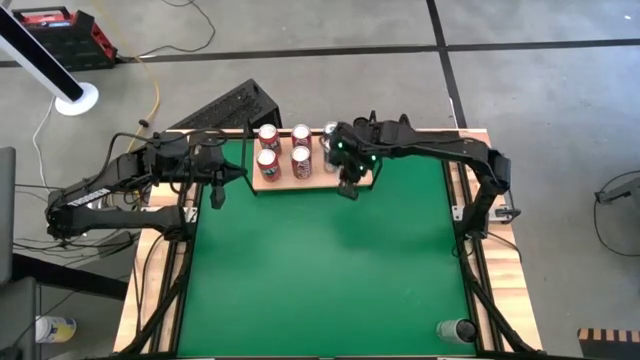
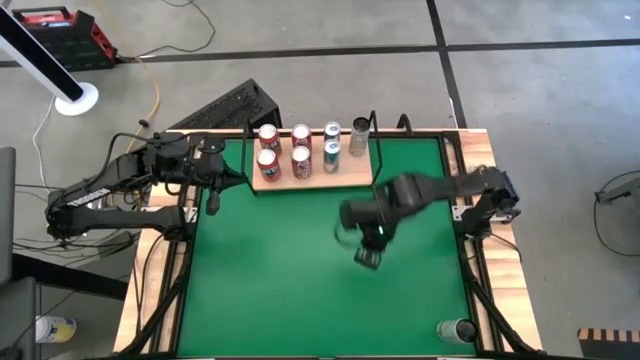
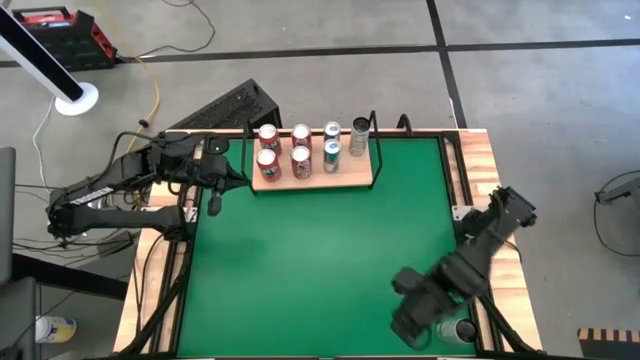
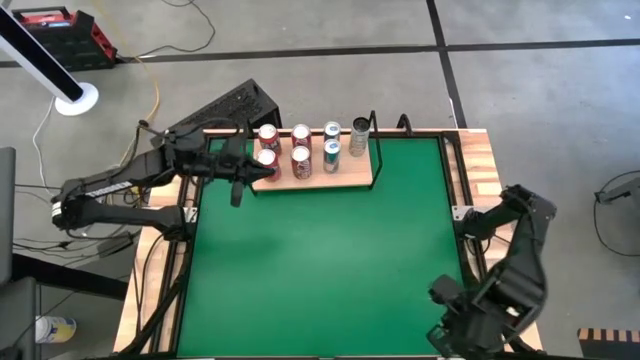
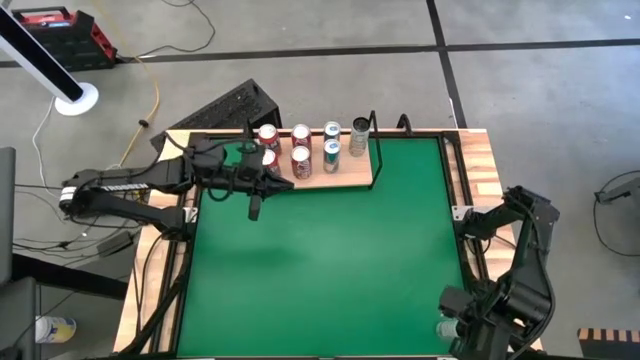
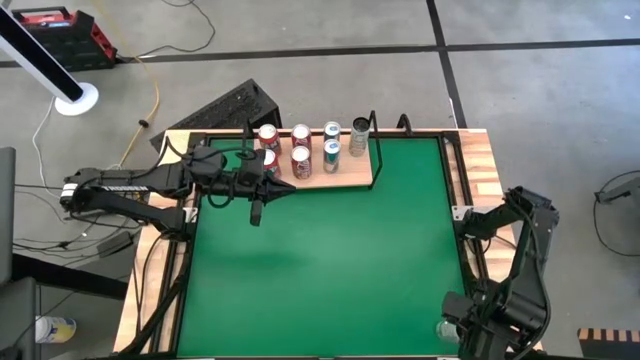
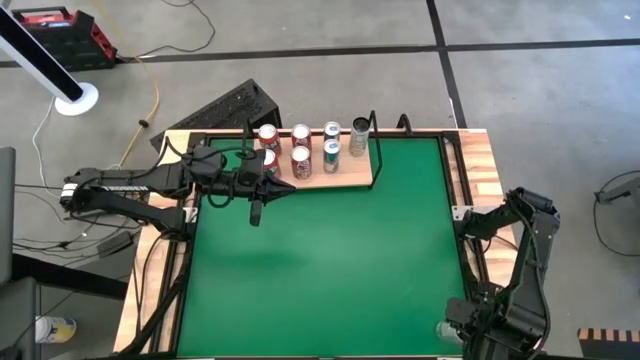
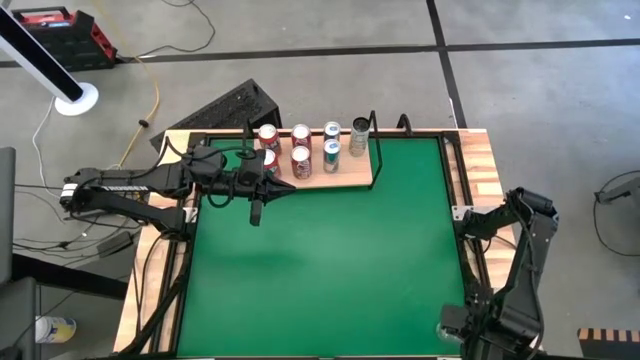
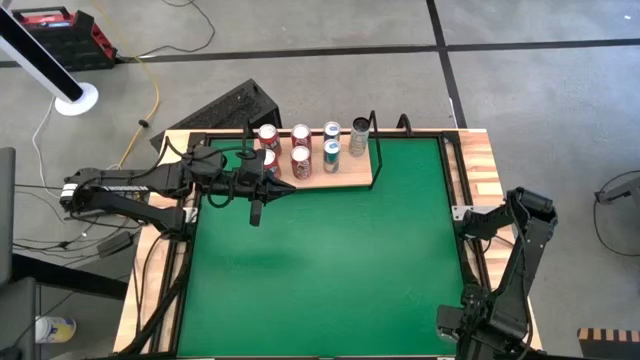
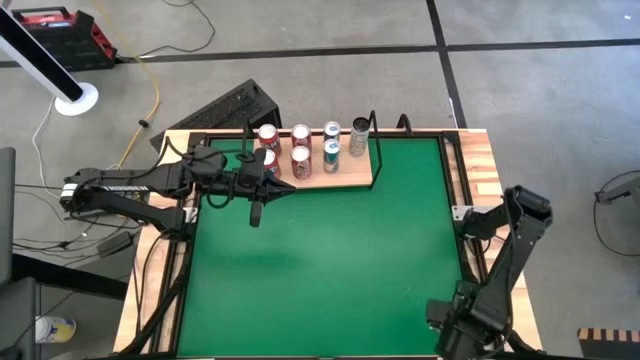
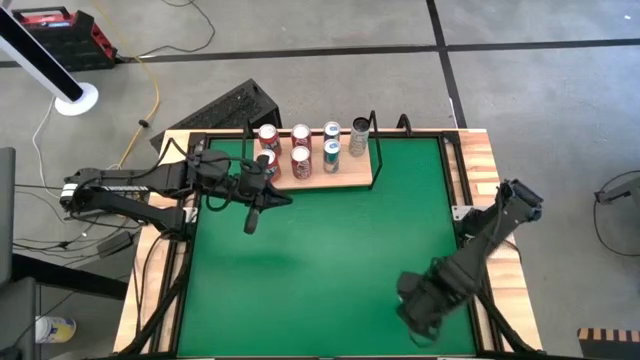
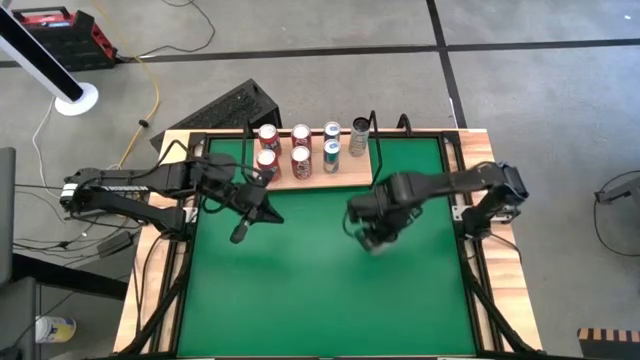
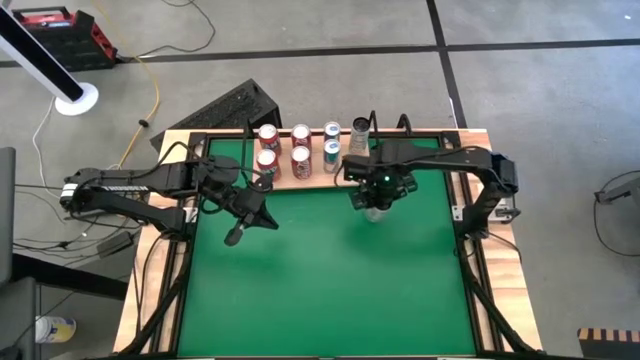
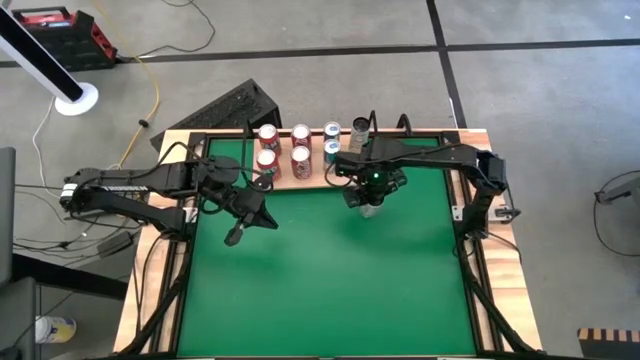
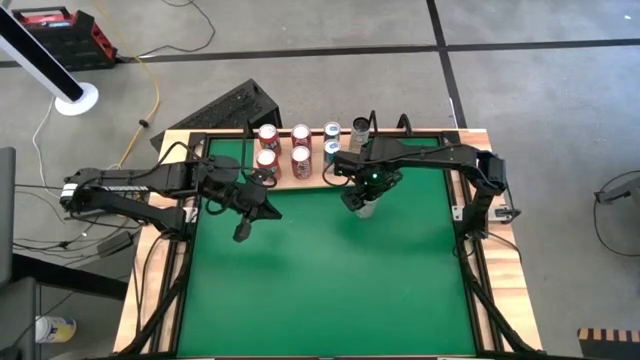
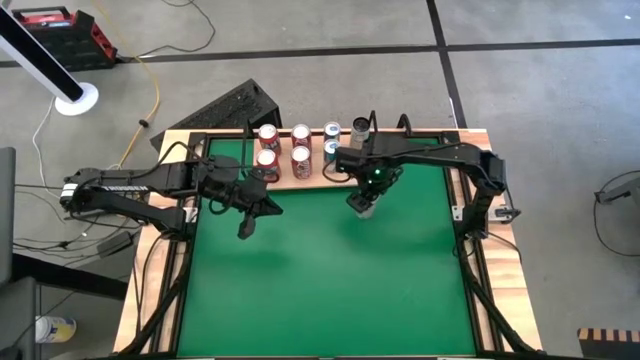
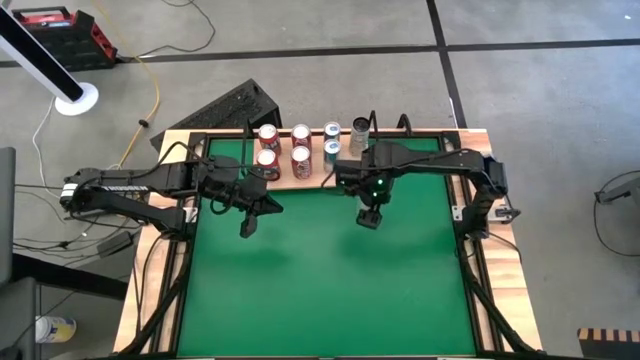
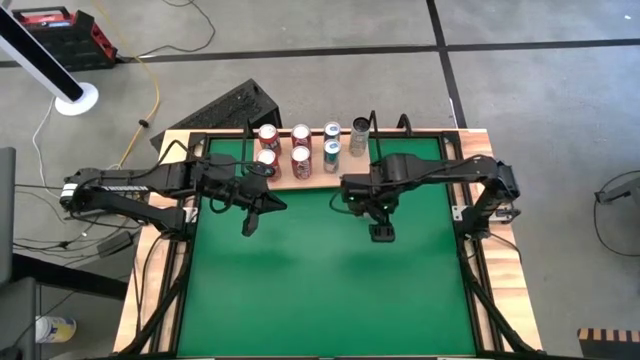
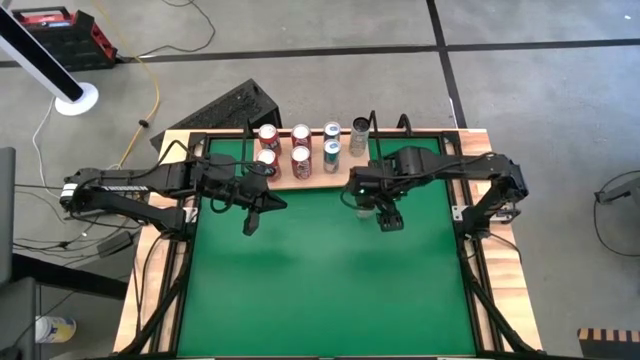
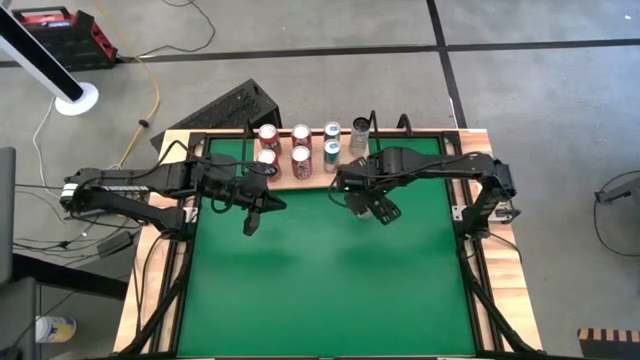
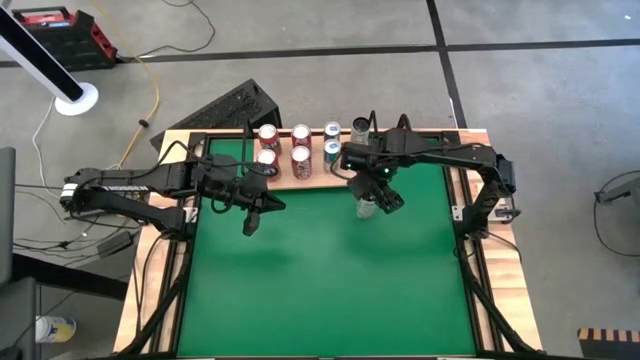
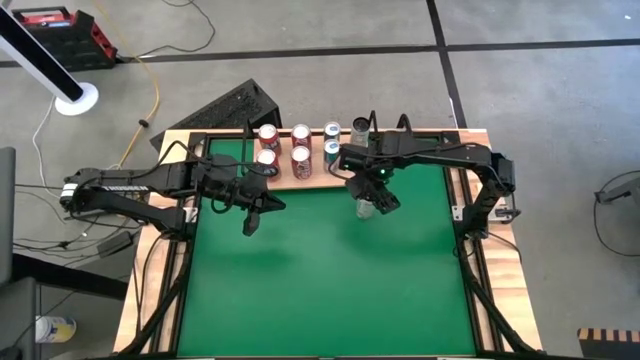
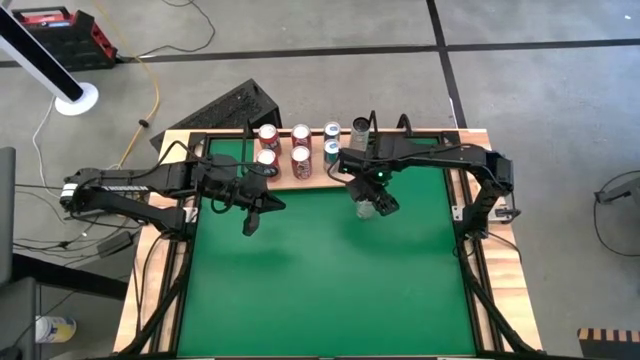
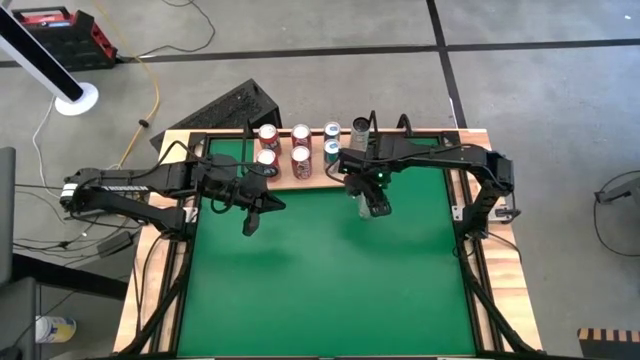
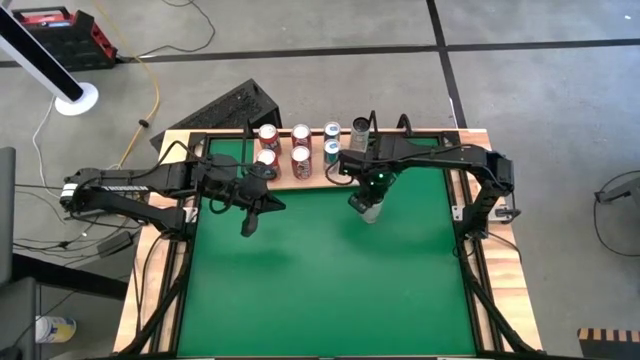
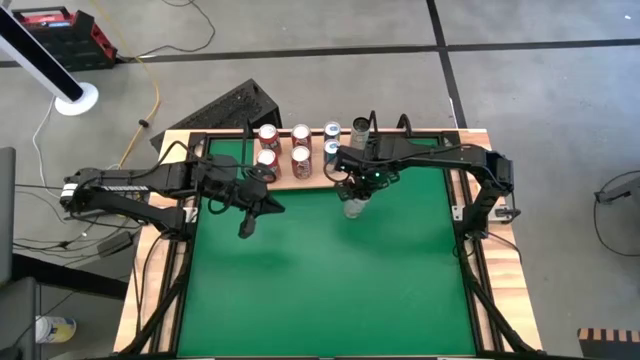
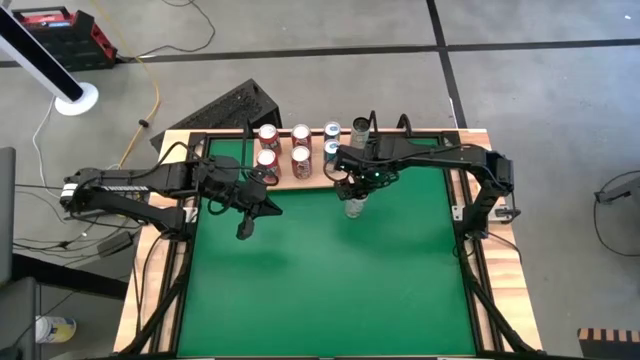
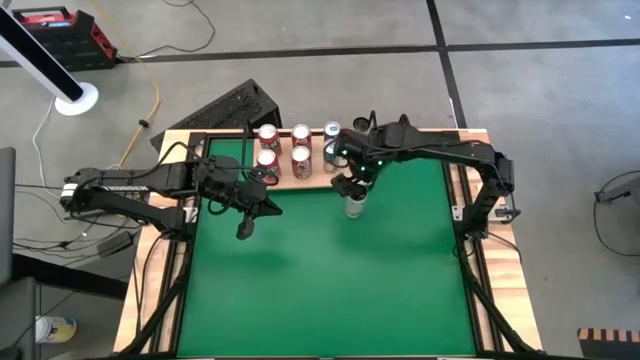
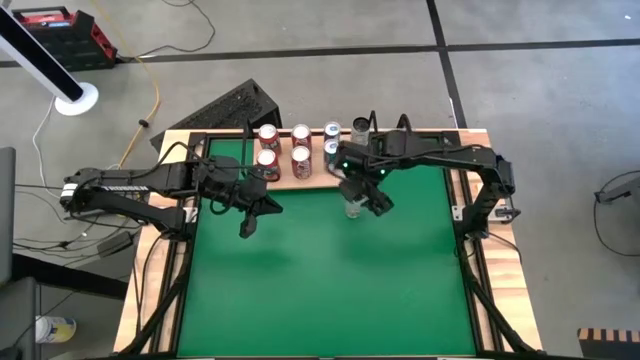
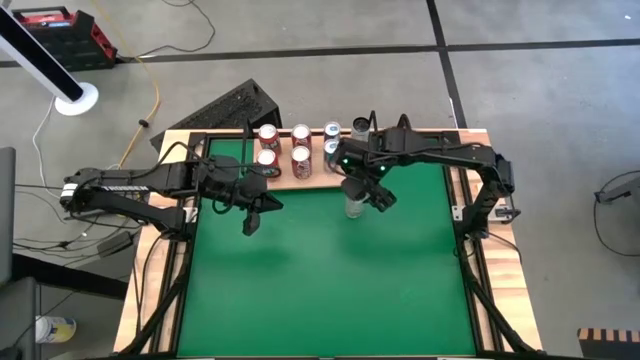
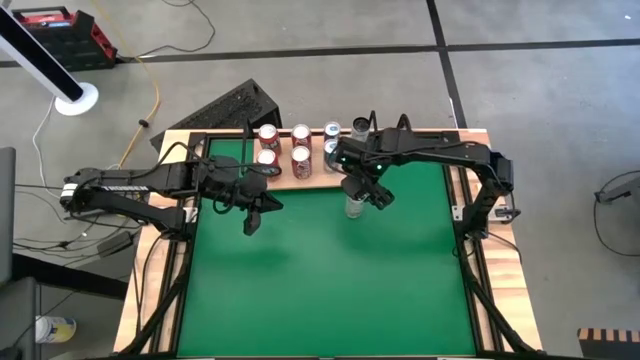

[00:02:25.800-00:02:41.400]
Task: Place canned beverage on shelf
Put the white and yellow soda can, aligned with the other blue soda can on the shelf

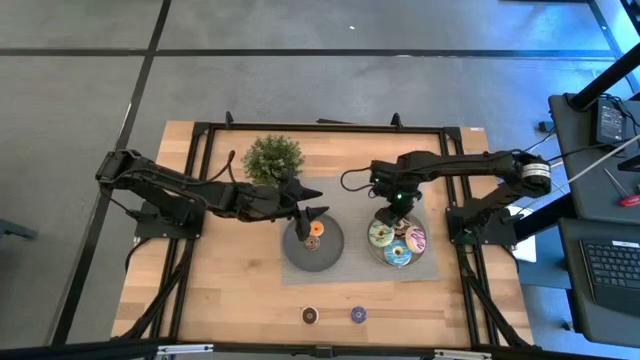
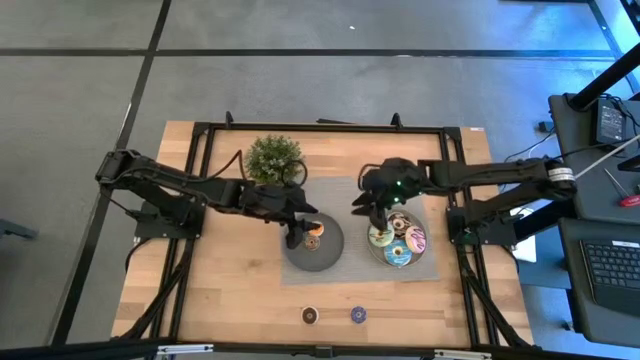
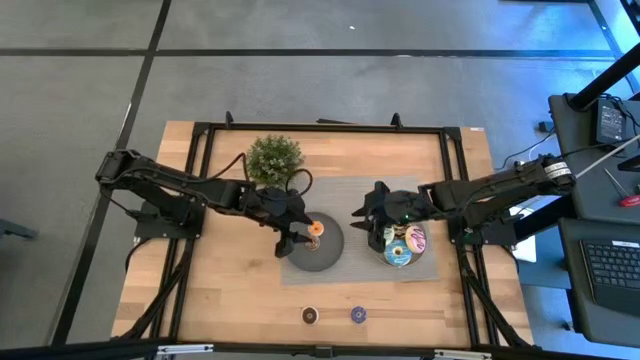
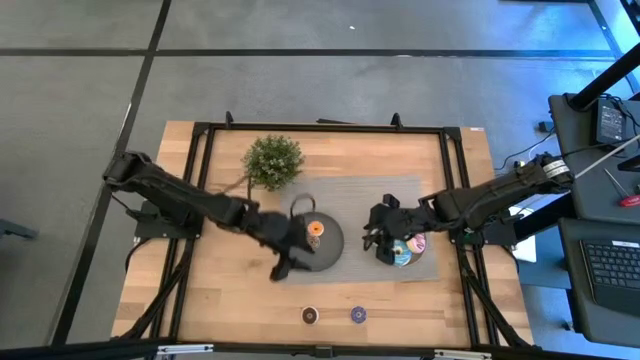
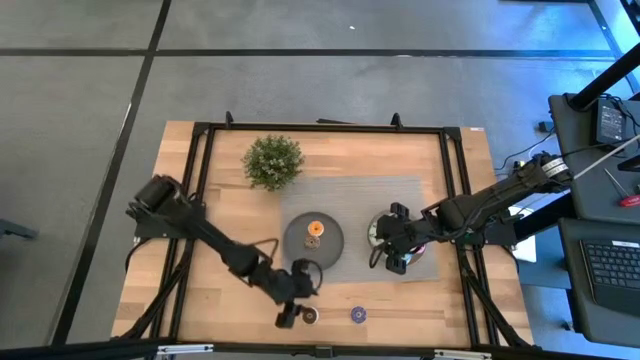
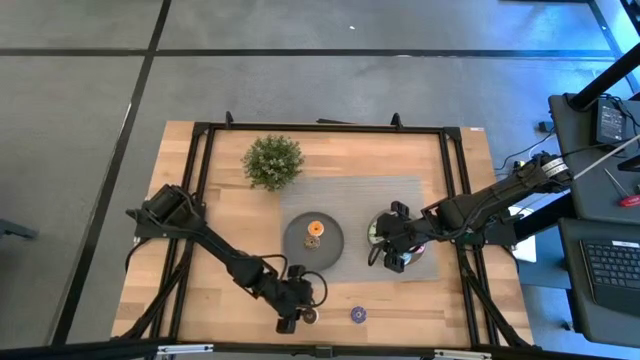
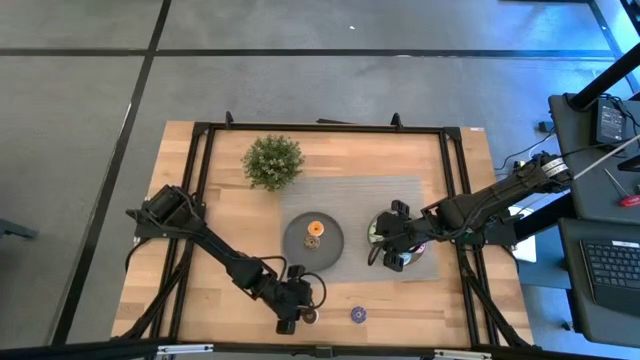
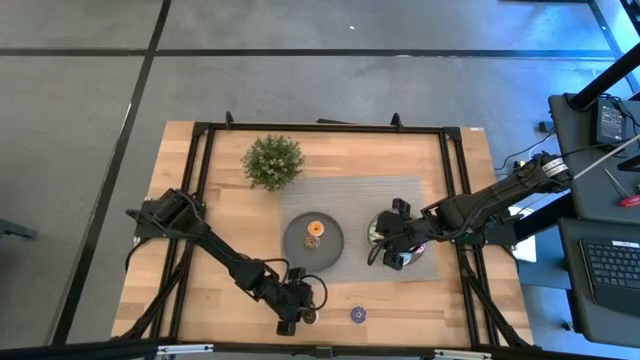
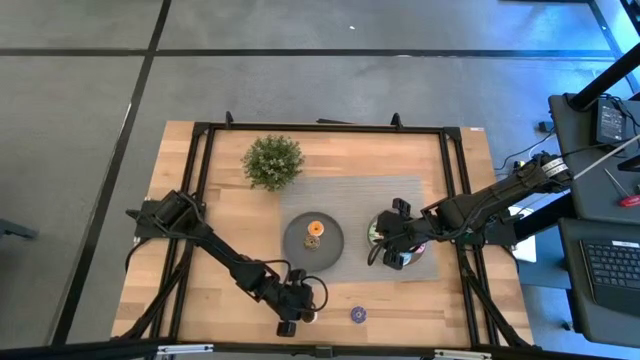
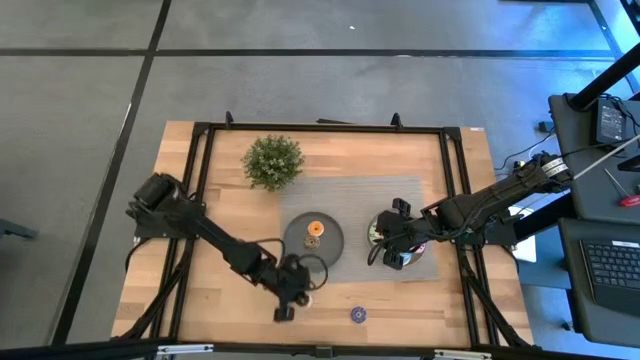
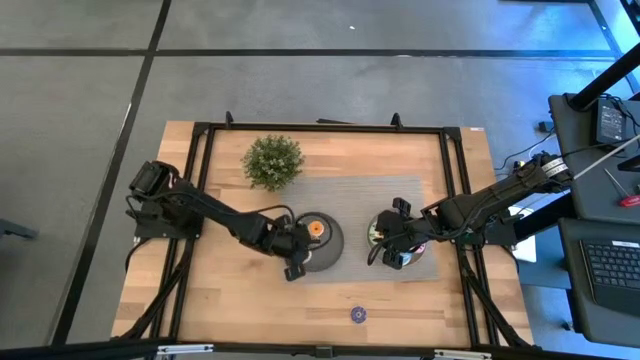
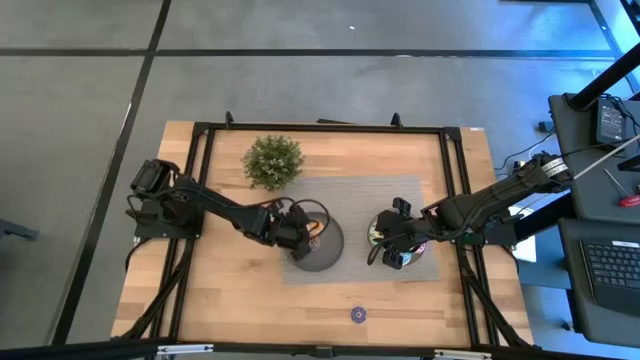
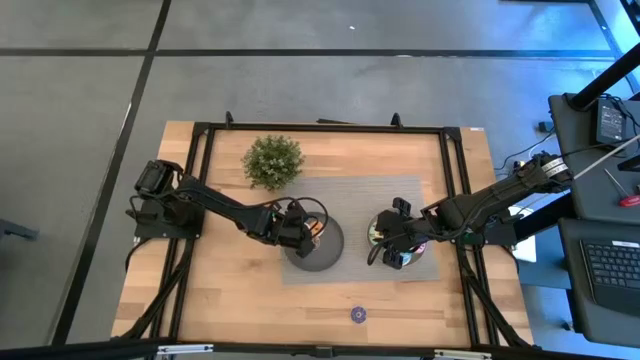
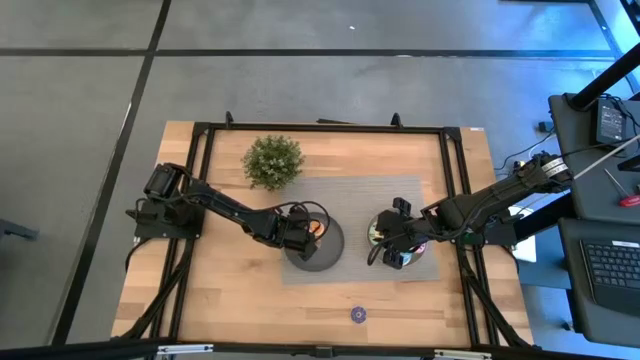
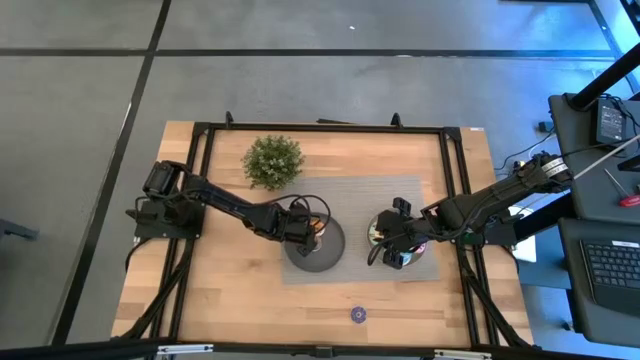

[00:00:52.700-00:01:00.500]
Task: Pick & Place donuts
Put the small brown donut on the dark gray plate
